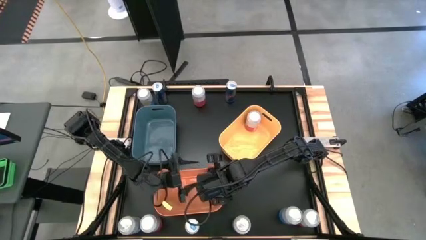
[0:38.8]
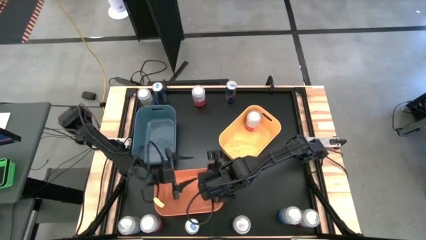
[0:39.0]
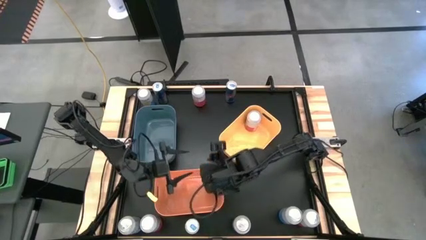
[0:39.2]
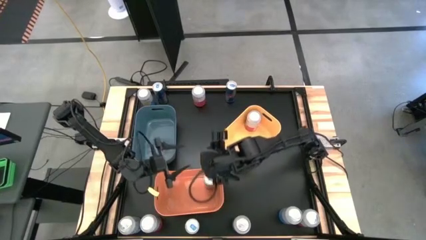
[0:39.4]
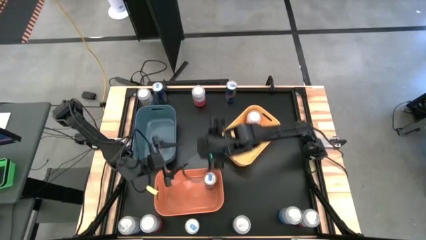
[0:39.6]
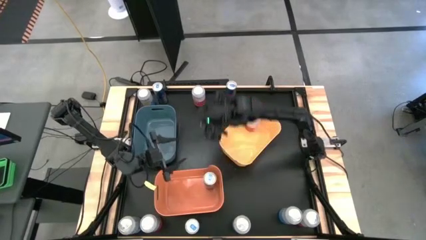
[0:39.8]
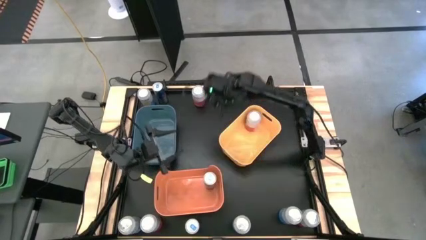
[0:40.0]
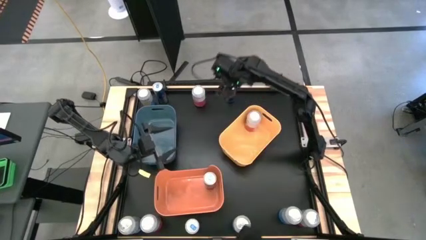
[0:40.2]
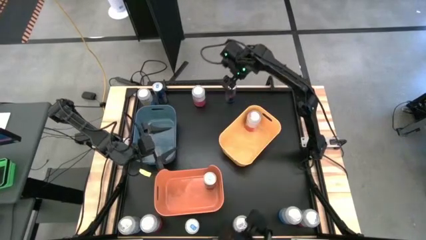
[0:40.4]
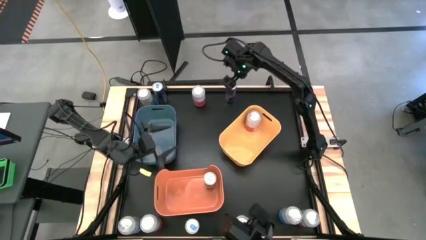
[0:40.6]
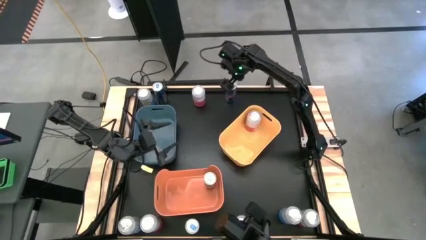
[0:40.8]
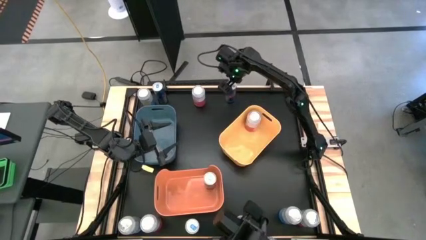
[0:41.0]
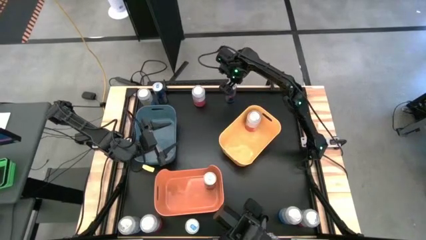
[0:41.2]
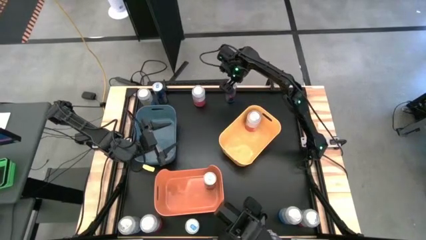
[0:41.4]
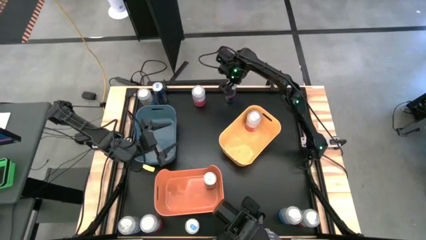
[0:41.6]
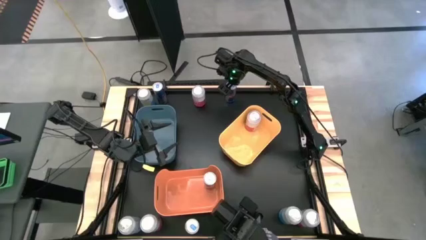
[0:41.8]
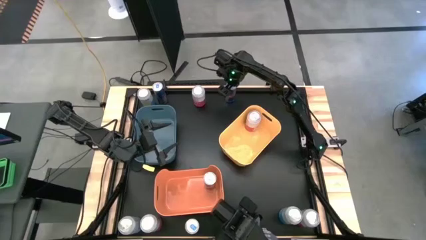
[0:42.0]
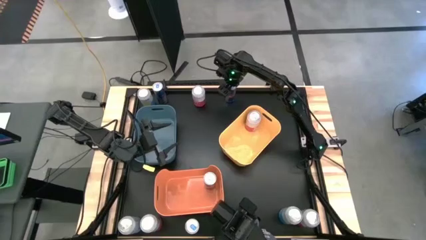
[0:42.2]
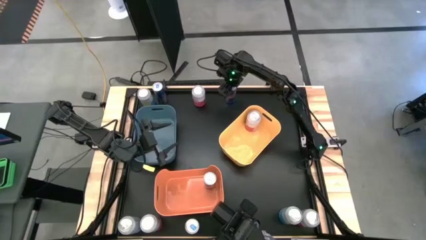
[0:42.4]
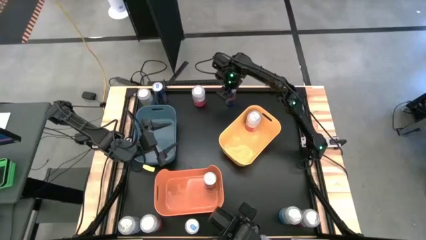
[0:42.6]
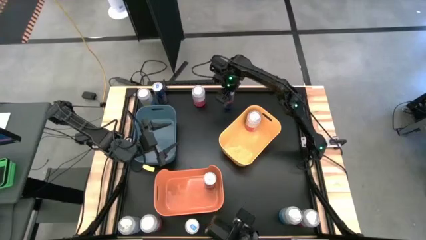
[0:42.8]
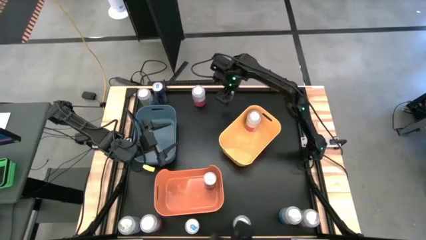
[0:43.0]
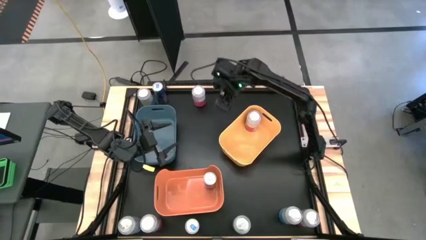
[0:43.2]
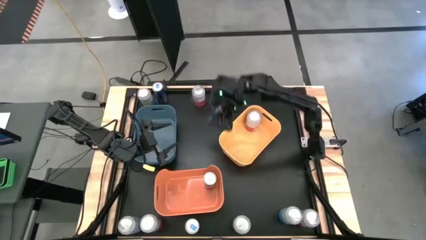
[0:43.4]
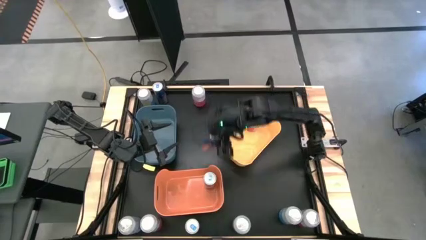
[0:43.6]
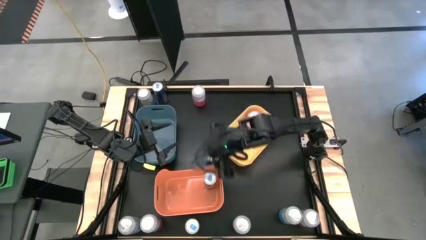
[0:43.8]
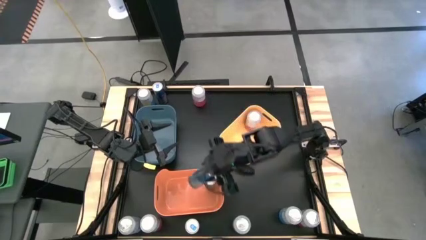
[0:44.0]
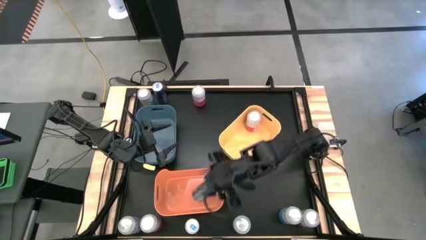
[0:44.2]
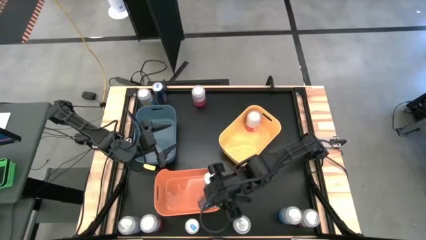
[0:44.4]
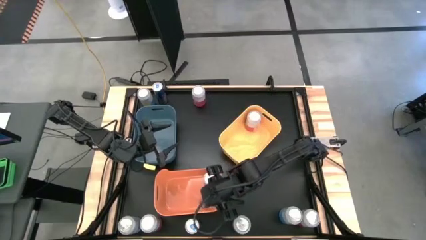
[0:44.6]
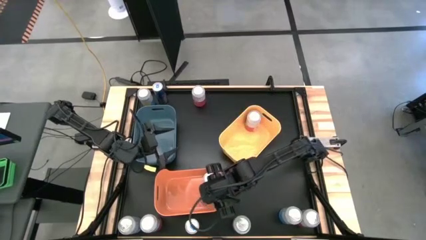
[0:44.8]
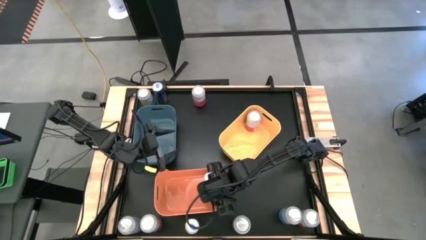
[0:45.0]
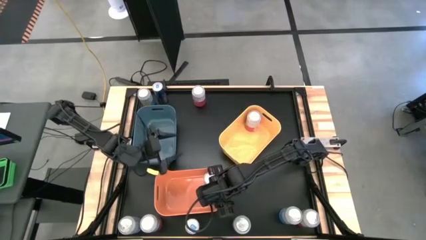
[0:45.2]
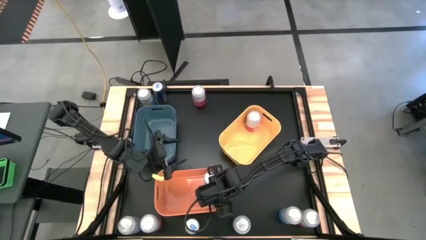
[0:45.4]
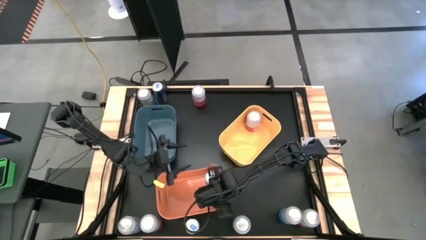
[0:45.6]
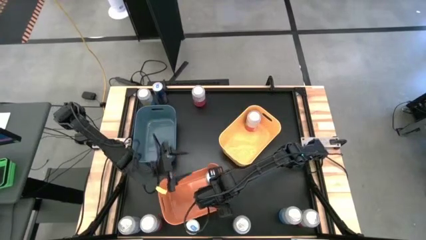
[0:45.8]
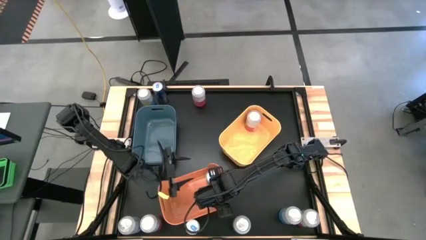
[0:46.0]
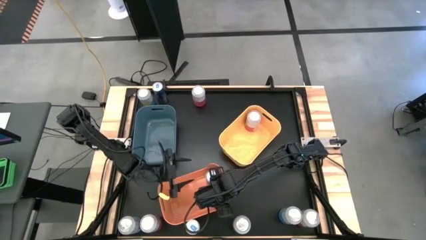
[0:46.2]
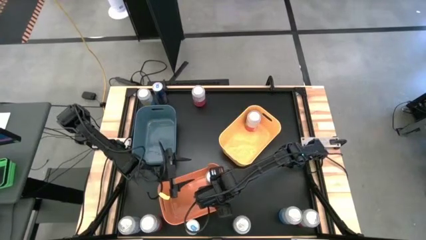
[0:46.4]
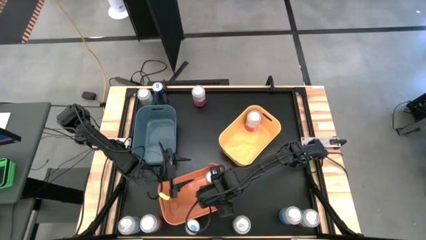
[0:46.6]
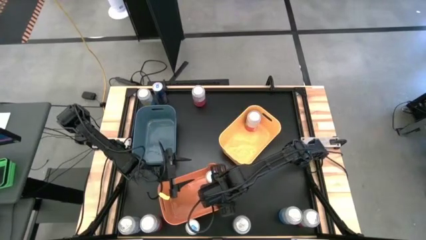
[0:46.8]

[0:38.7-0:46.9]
Task: Sort soda cans
Put the blue soda can into the orange bin

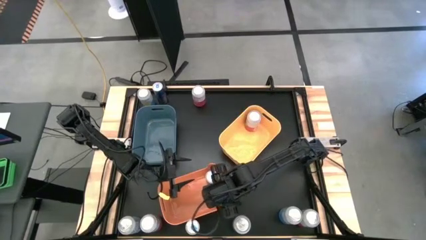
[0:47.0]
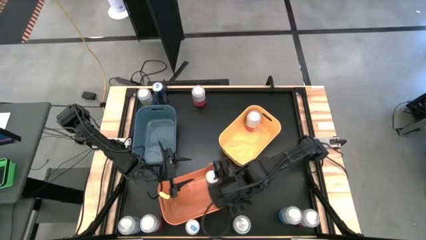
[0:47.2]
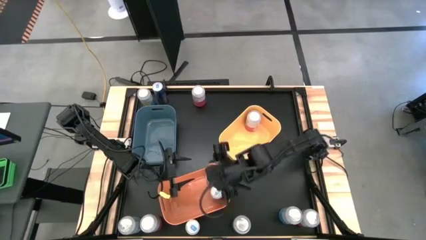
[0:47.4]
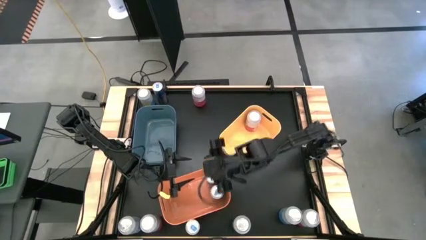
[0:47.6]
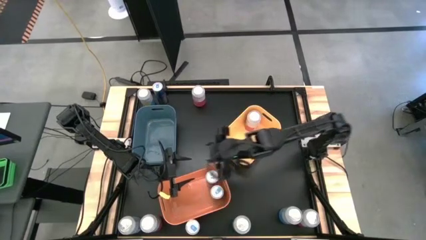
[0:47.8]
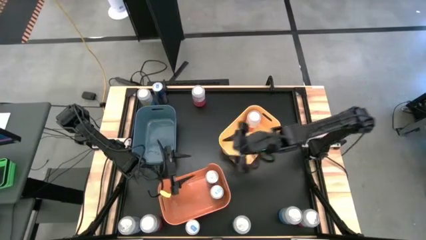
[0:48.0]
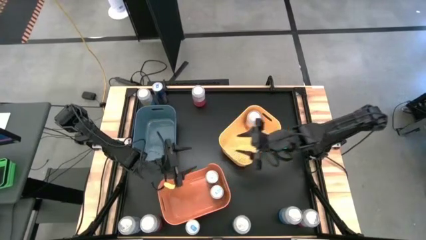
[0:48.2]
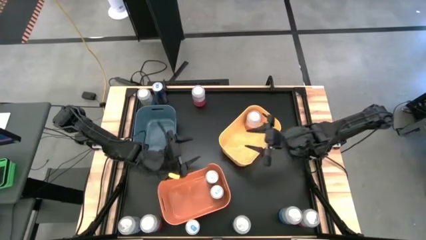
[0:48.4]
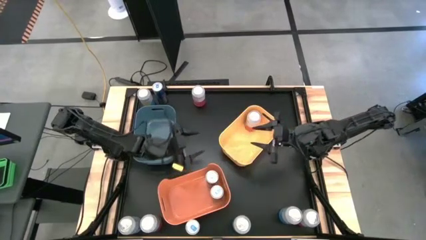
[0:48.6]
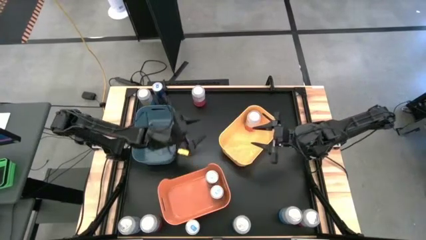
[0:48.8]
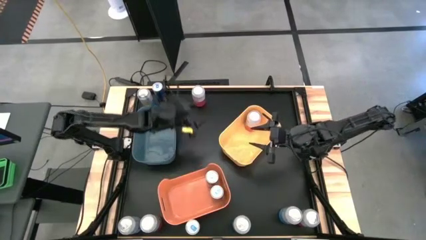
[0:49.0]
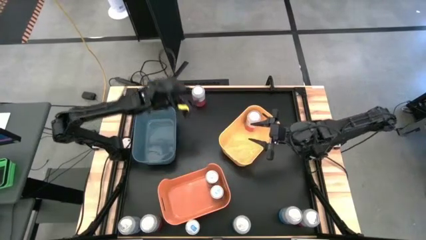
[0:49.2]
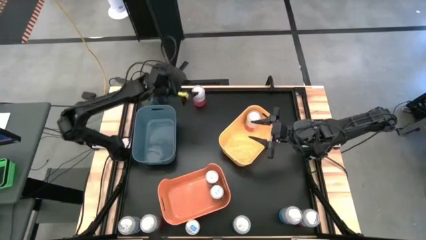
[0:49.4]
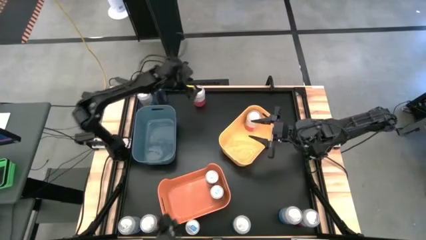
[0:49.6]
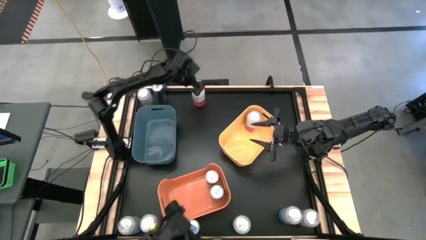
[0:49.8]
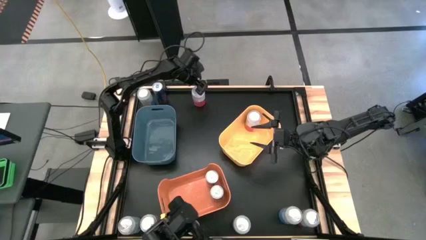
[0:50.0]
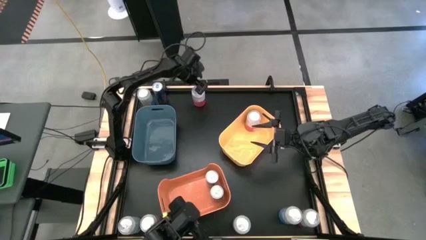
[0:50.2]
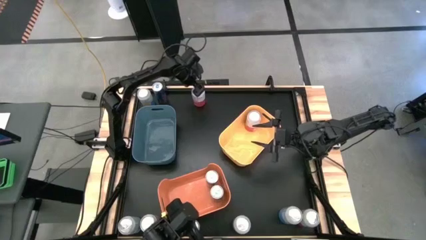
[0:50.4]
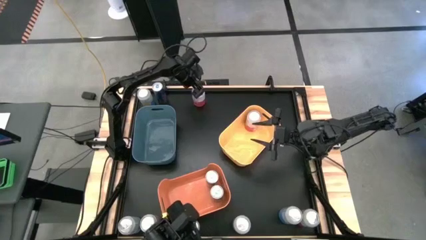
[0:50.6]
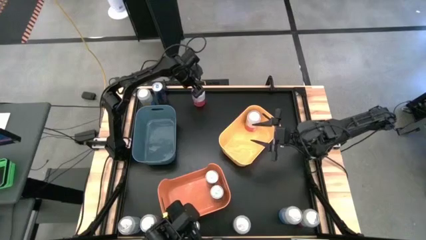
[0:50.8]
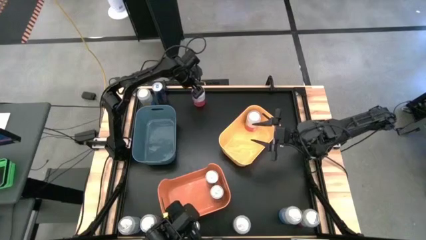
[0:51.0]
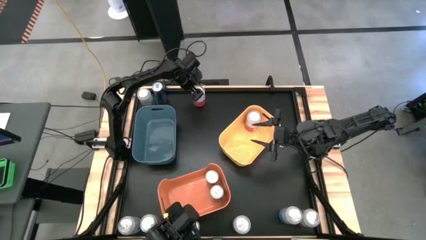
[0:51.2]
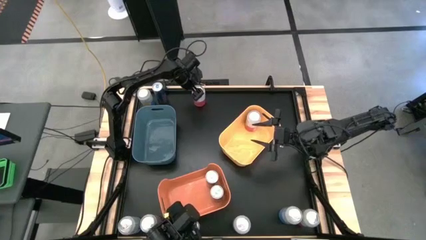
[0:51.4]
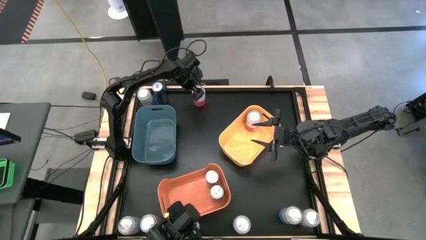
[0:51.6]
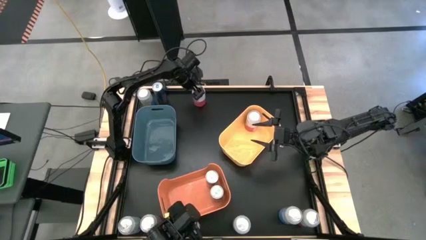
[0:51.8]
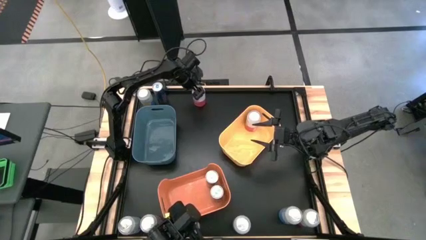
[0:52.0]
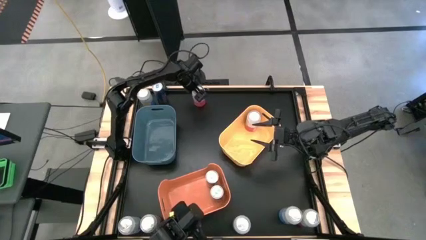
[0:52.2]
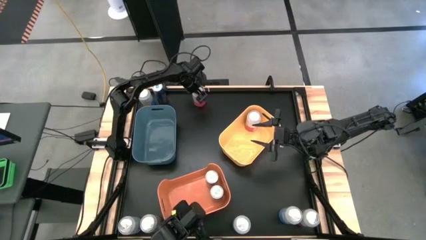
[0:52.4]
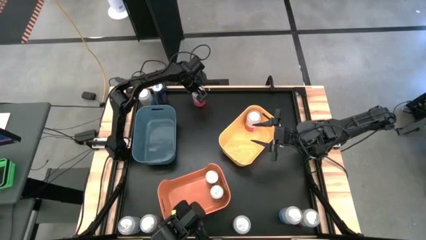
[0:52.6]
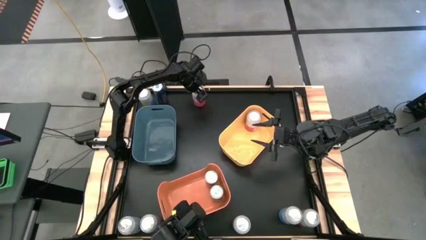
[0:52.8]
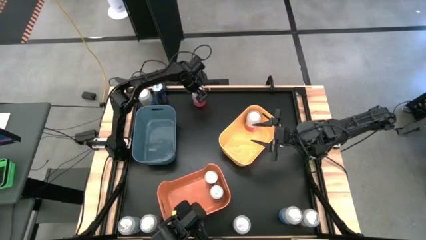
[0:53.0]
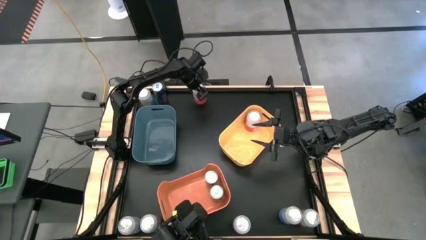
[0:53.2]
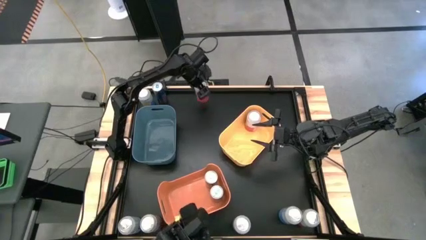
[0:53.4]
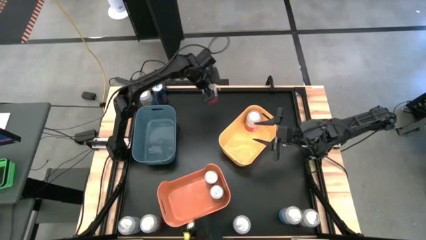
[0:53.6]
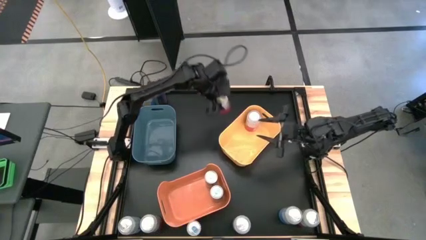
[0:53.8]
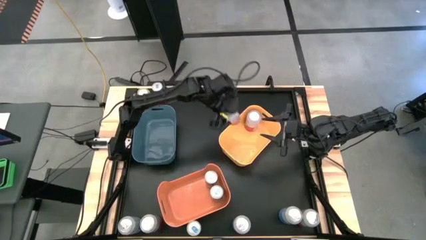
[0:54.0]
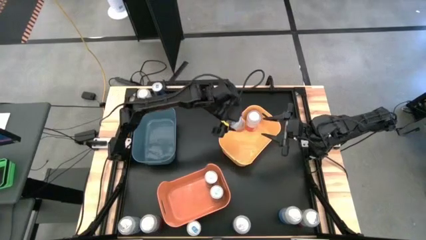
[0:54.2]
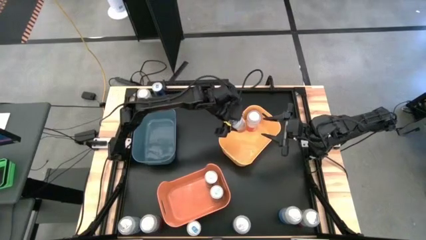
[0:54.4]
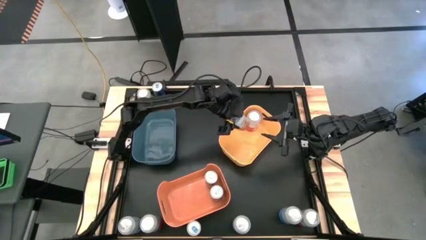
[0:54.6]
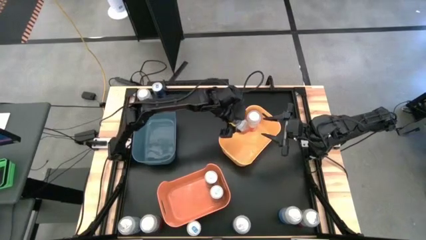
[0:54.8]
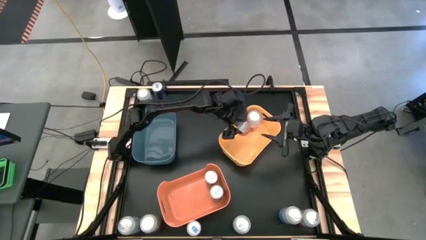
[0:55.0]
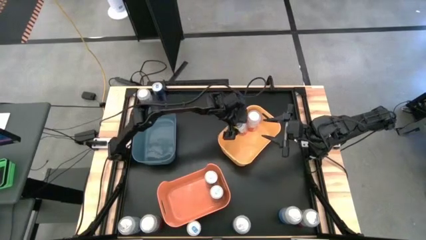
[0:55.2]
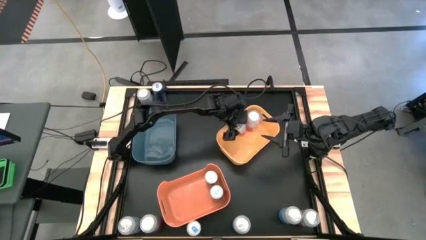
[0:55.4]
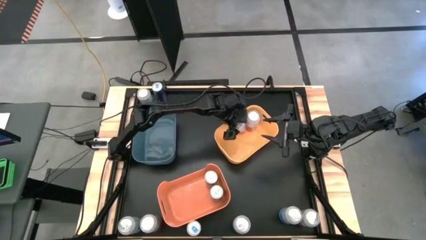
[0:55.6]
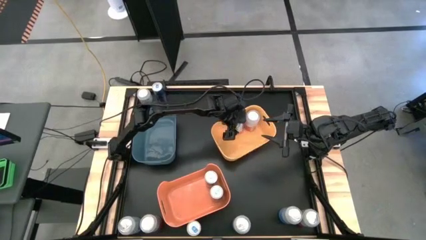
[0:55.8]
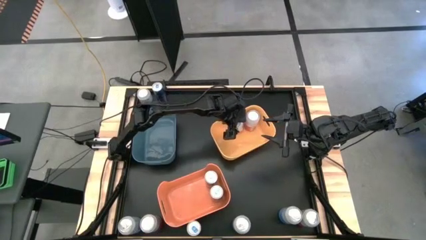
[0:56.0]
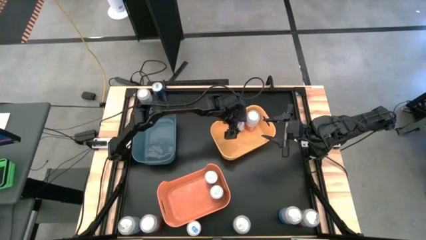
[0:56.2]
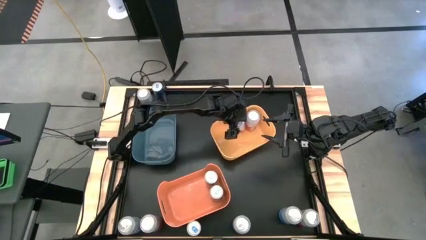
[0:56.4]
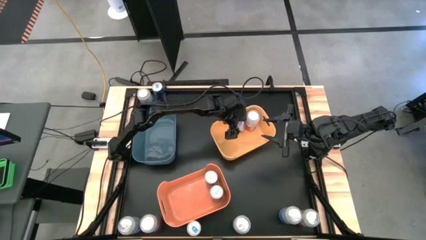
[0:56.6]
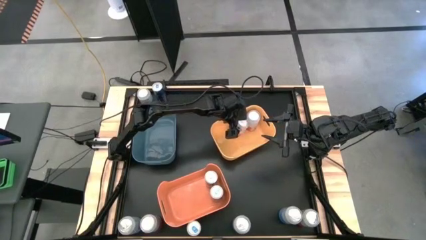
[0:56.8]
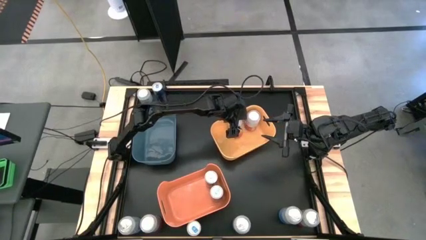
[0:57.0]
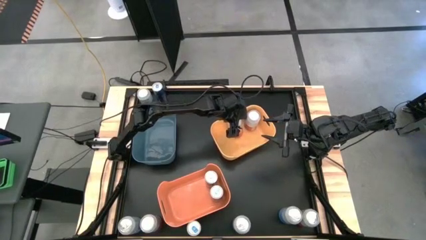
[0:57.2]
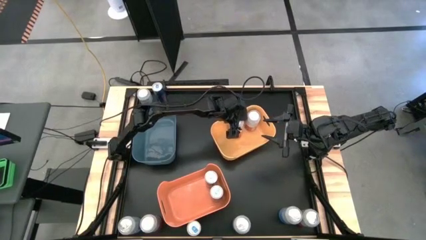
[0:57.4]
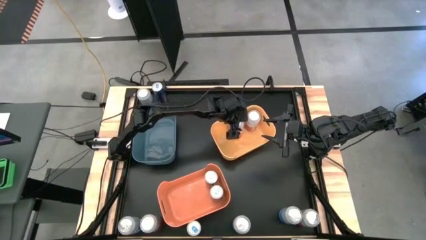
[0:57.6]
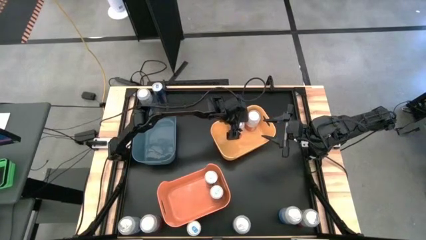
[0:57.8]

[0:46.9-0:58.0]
Put the pink soda can into the yellow bin
